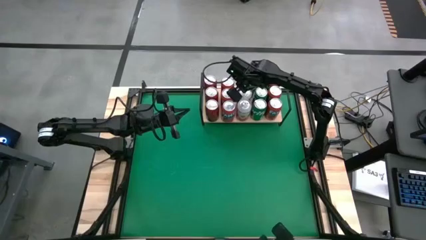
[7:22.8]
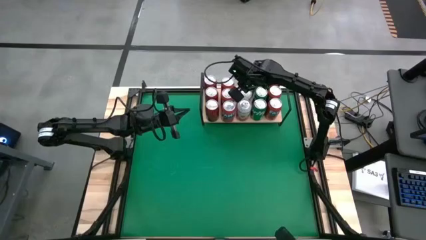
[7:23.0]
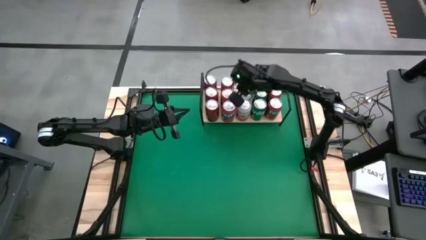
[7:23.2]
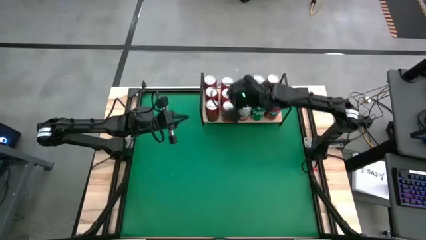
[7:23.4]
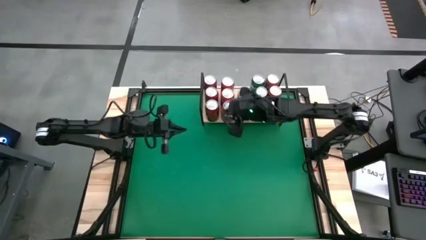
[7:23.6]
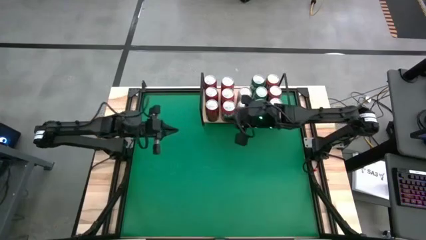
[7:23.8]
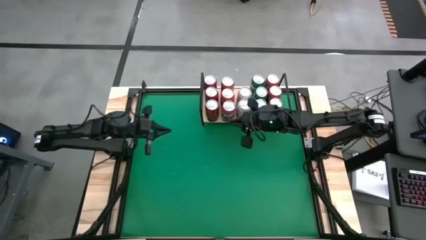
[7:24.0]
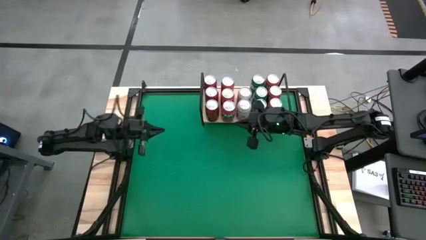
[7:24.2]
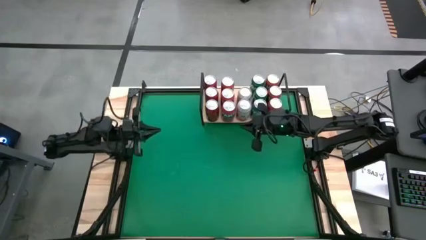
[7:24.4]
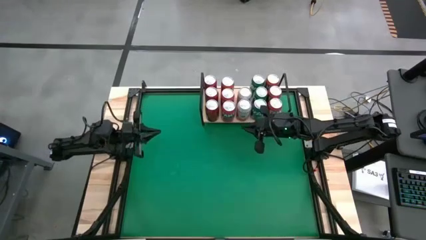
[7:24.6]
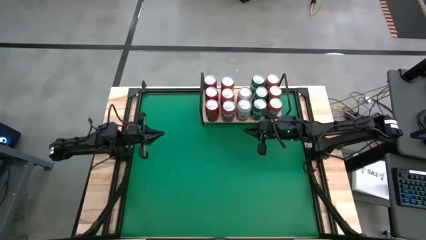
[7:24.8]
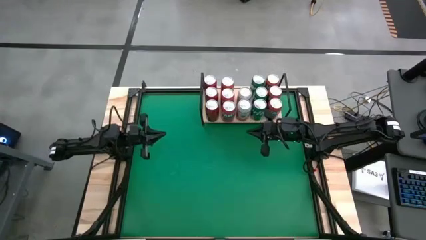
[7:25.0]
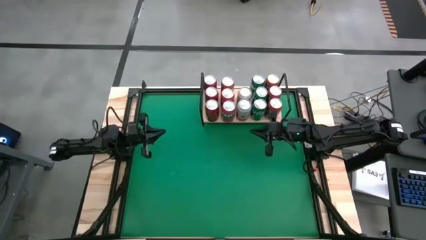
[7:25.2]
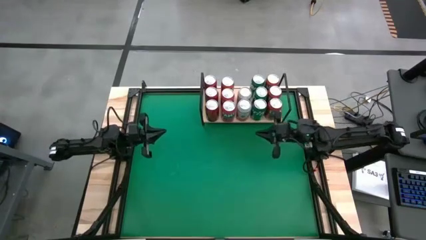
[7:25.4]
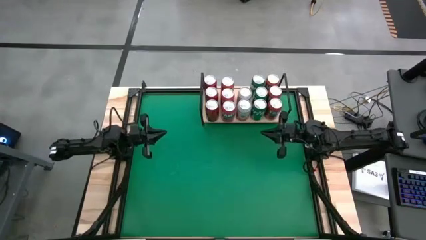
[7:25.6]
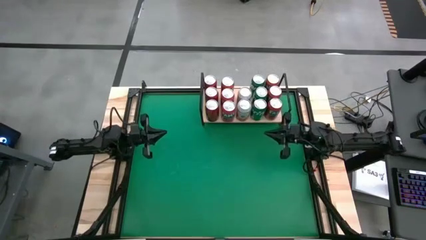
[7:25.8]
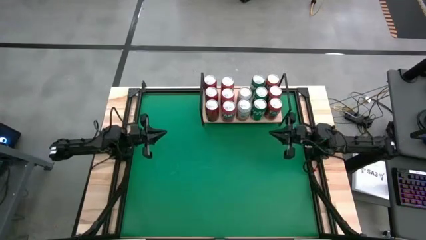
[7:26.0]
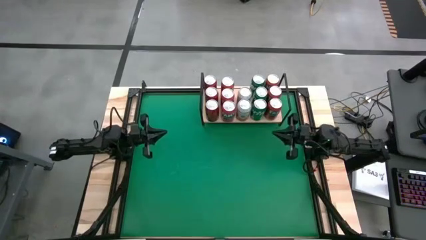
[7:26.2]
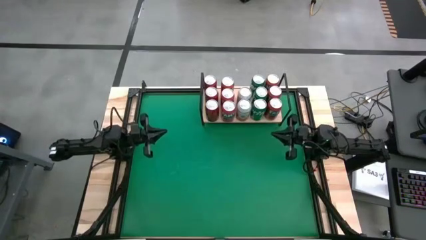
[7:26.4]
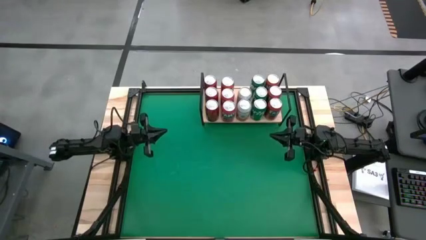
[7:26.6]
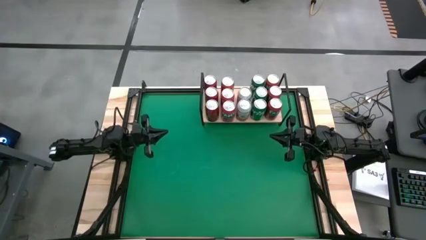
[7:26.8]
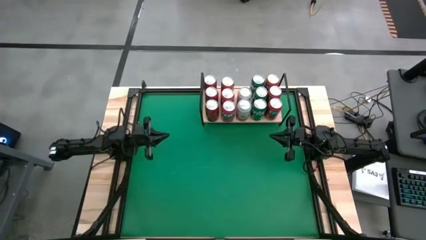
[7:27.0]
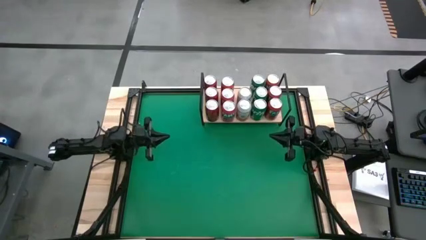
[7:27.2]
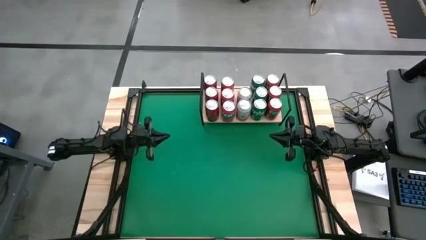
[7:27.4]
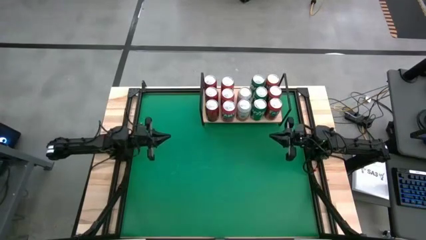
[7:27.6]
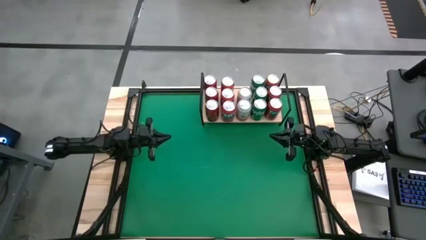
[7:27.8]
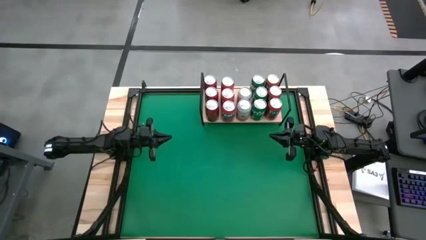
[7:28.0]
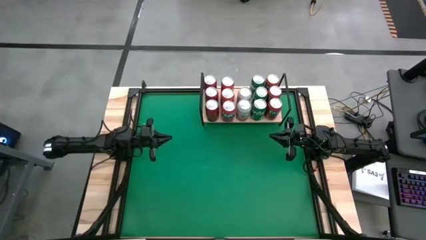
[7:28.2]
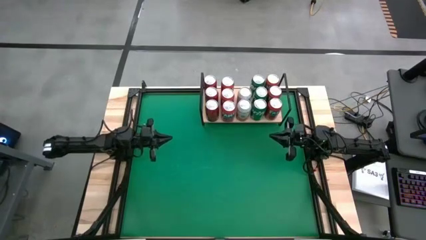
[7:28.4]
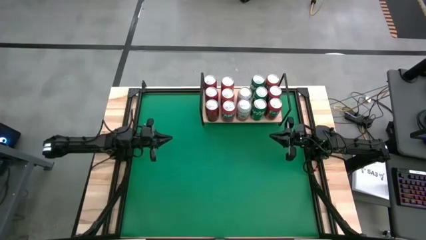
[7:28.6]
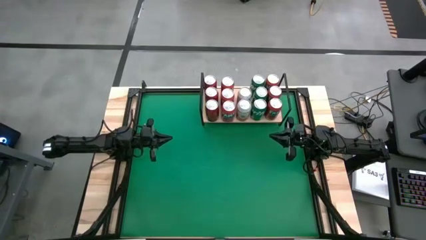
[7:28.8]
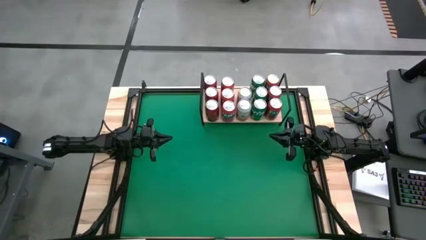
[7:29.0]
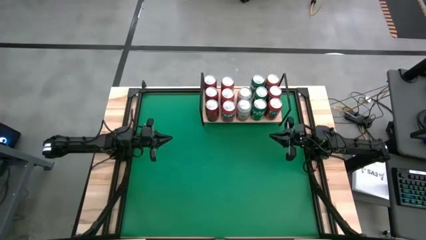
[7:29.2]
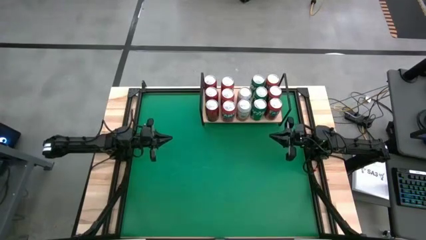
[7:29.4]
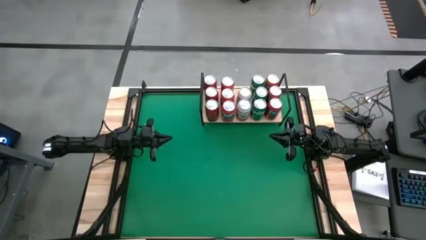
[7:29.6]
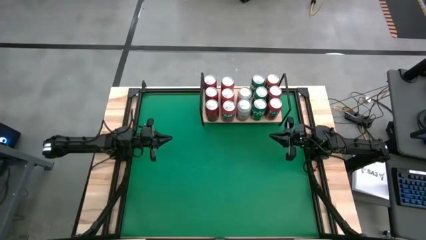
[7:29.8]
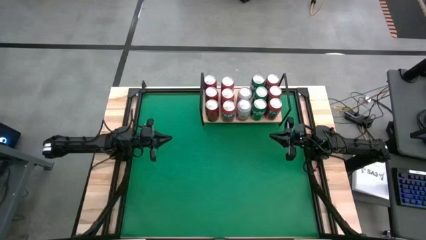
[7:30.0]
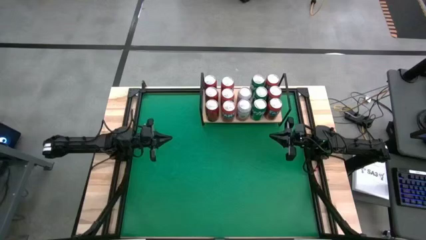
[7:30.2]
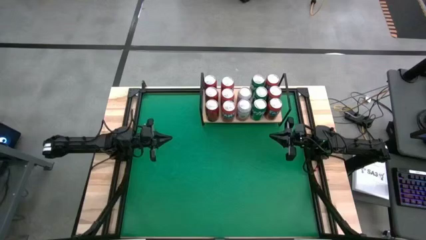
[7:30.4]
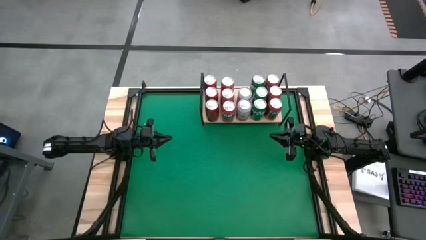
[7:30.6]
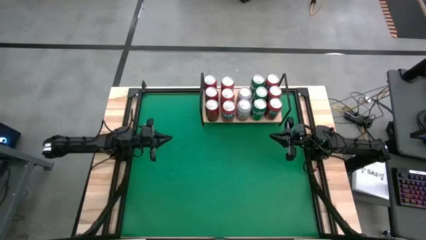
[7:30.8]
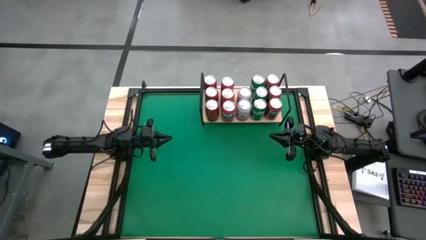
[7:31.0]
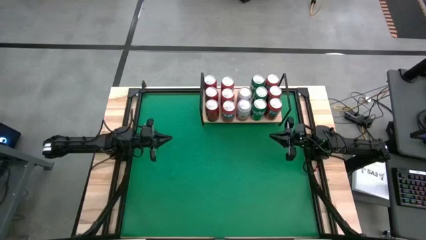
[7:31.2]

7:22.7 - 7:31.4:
Task: Place canned beverage on shelf
Return to Home Position

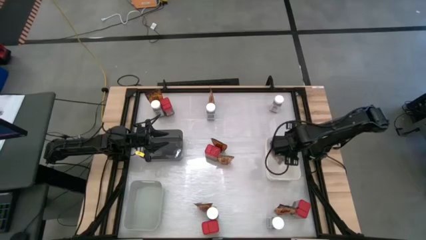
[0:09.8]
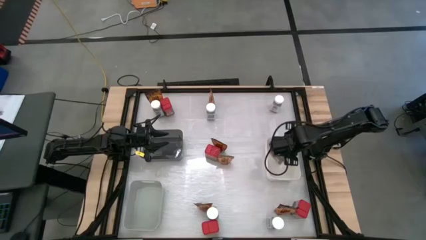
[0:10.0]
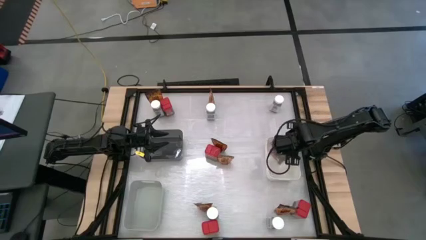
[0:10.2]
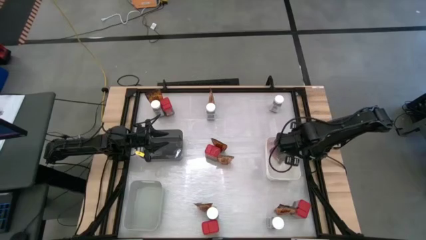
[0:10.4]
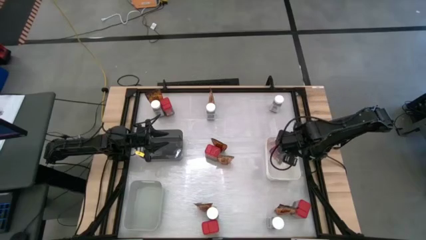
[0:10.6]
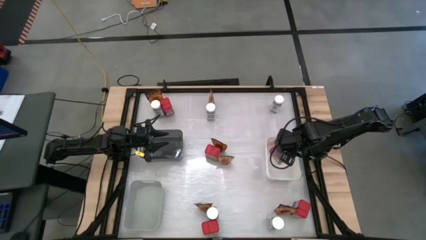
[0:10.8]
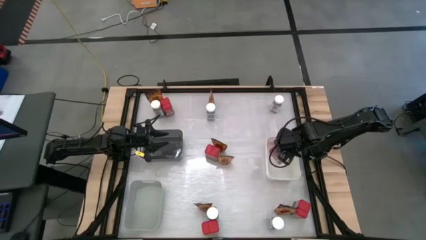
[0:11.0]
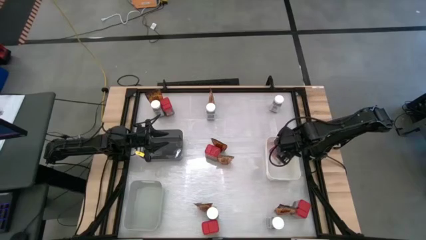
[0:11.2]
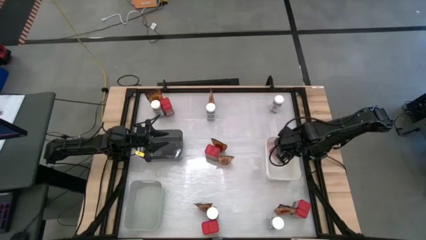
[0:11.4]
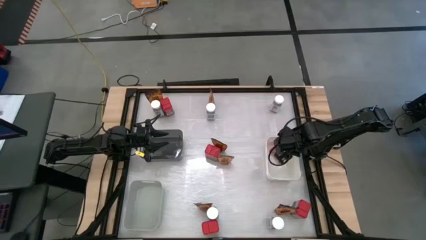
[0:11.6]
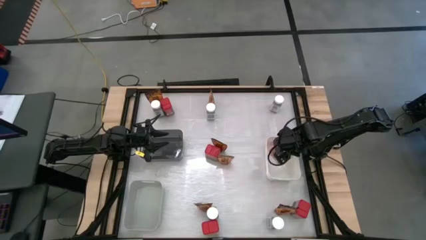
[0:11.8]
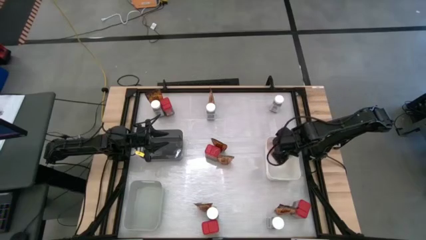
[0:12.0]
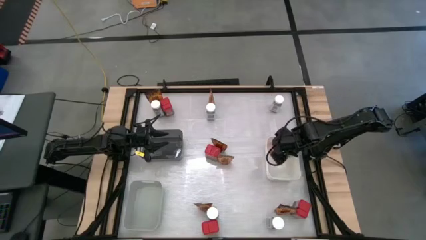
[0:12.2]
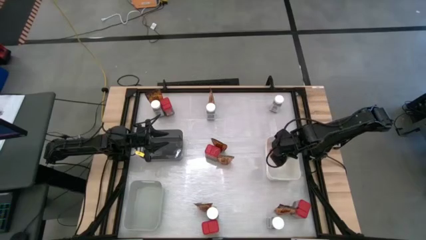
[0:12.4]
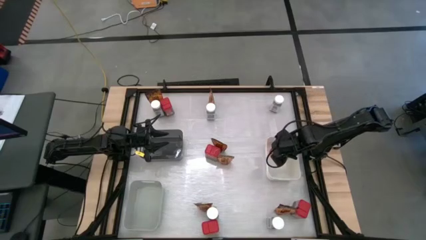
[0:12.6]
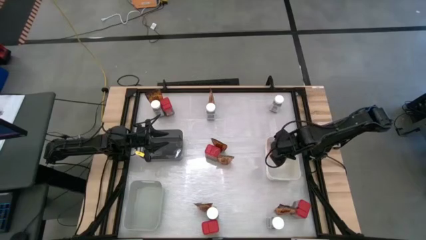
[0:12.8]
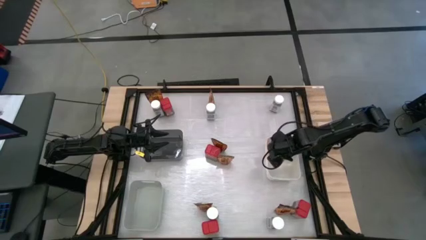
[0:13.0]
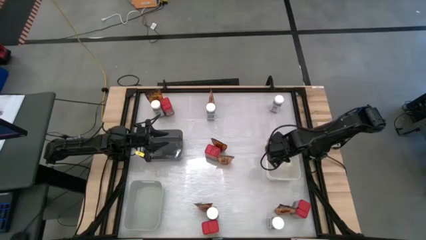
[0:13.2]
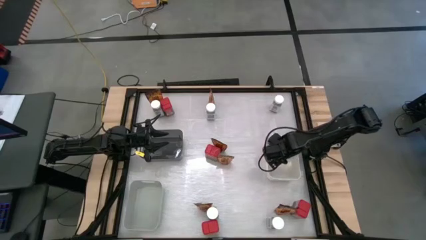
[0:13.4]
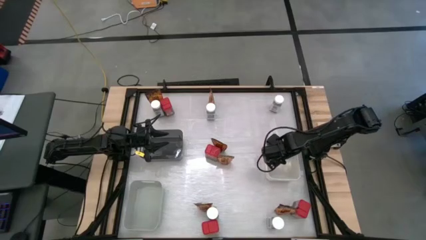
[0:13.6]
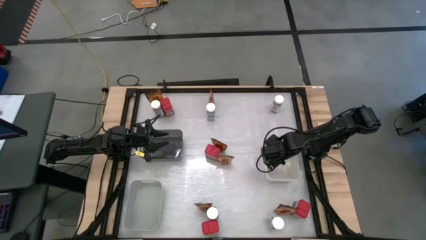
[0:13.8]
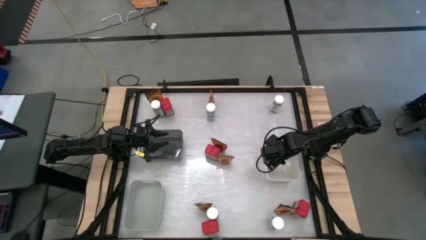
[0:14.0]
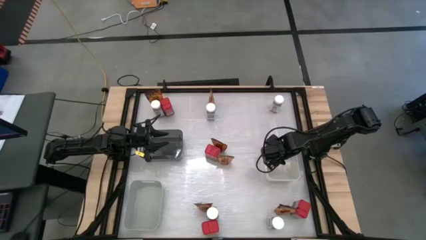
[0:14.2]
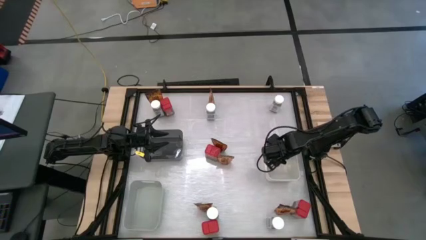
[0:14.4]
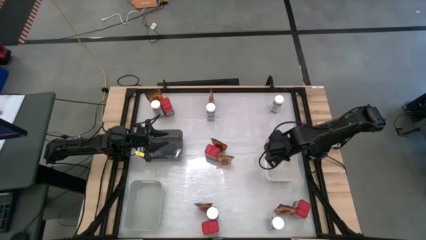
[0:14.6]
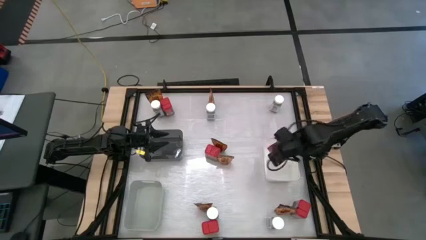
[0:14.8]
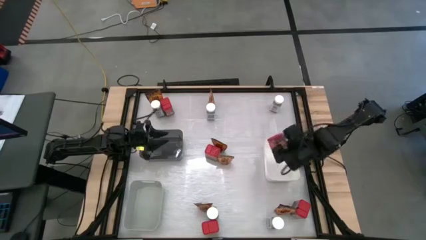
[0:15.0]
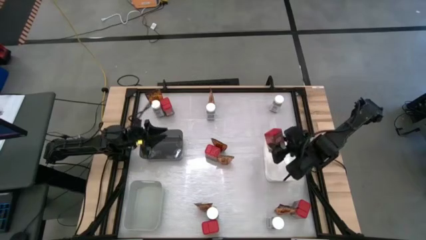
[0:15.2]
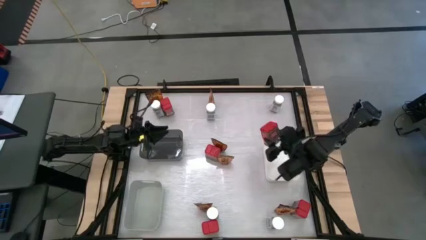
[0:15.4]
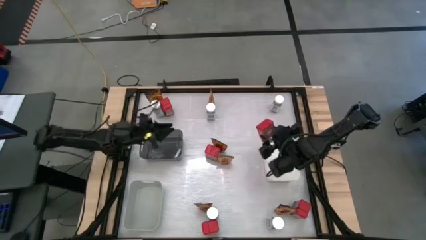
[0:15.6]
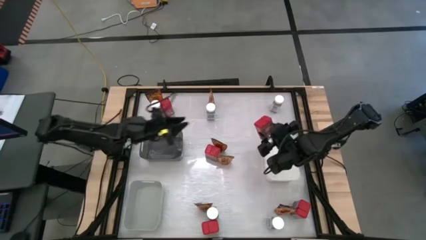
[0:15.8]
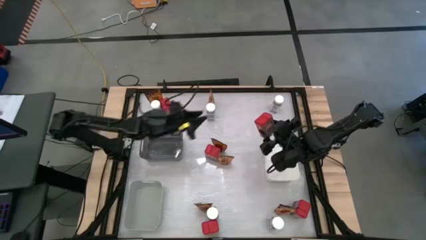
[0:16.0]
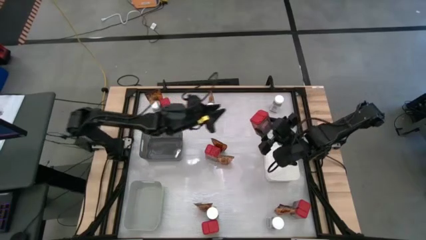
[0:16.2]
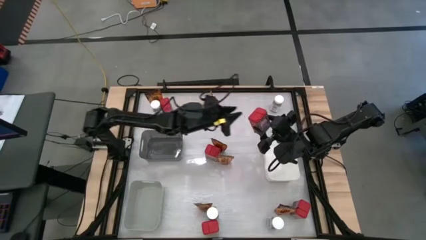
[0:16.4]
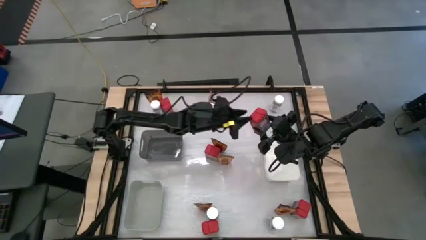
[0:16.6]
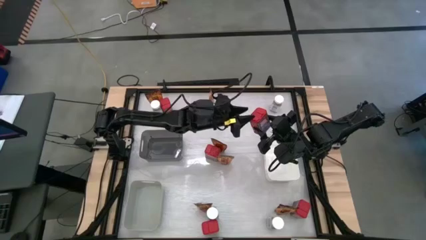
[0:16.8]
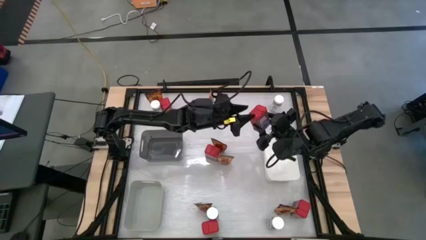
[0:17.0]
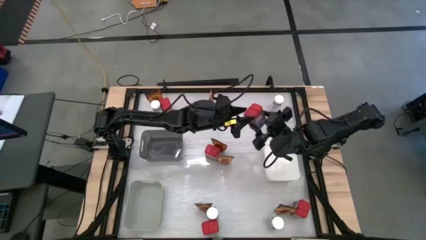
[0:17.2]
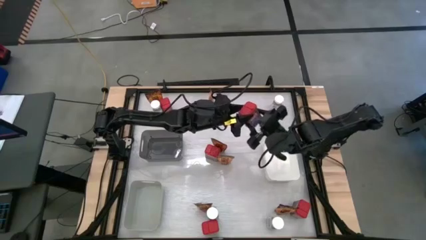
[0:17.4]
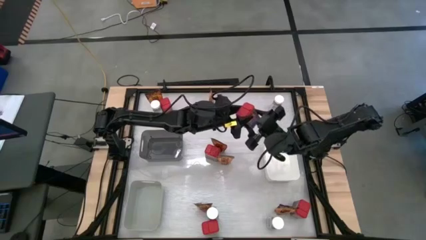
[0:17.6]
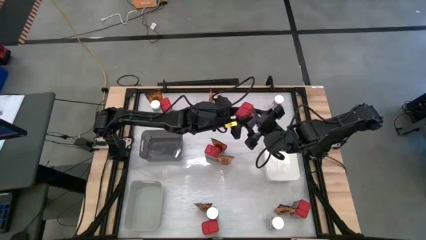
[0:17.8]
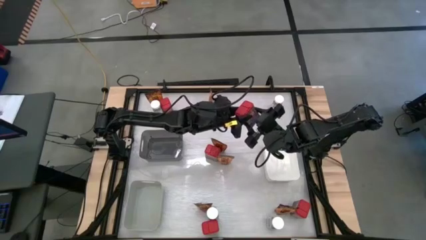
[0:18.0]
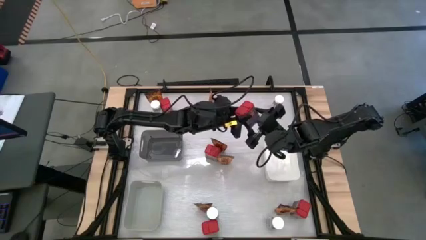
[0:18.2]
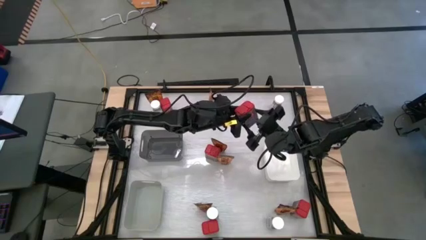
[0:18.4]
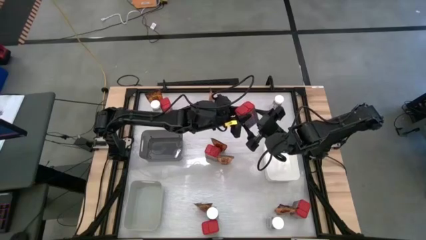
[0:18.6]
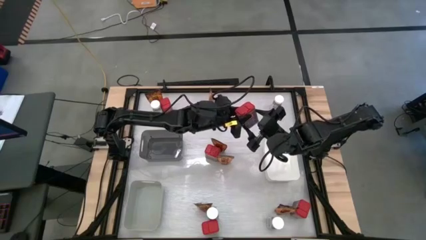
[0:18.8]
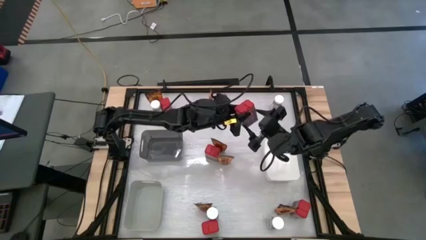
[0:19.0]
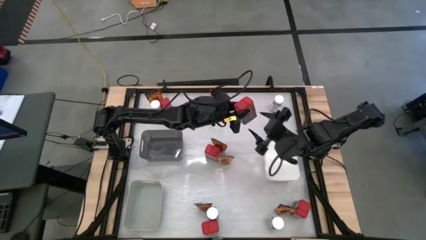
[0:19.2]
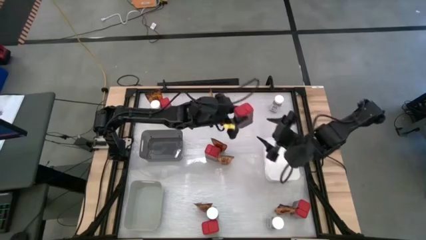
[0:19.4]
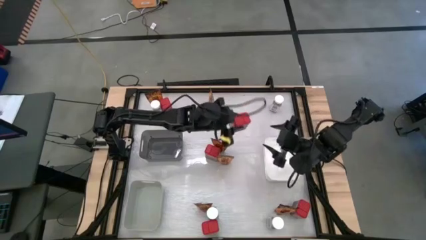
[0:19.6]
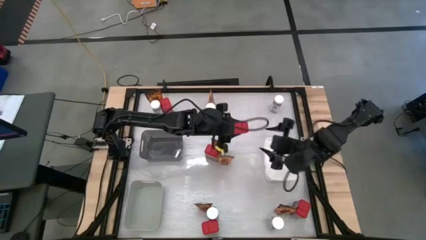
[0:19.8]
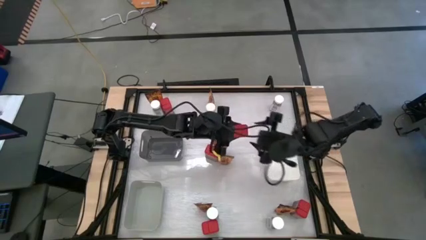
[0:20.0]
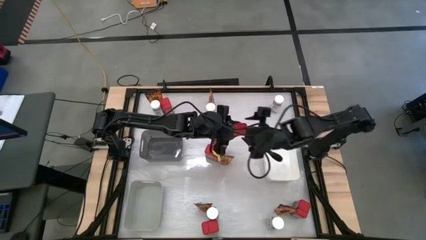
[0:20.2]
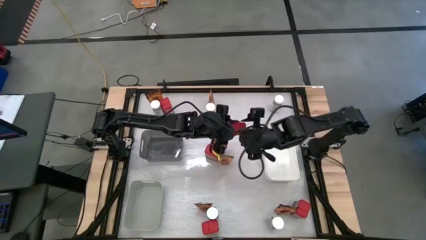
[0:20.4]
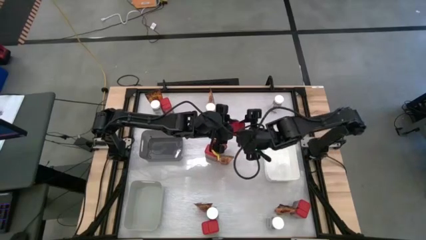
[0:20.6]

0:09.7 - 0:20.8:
Task: Sort spices by type
Put the red spice can into the white bin
